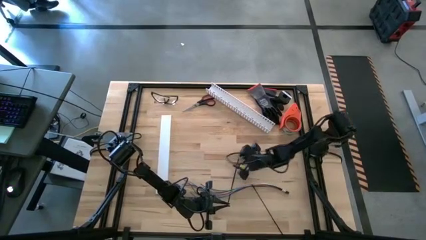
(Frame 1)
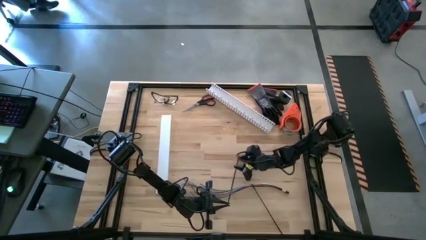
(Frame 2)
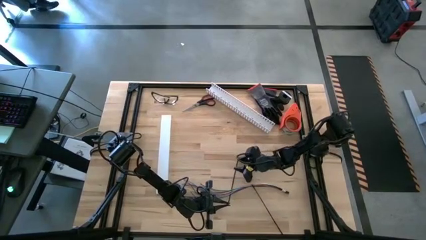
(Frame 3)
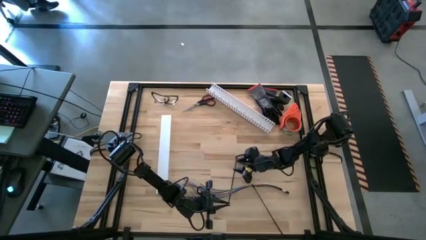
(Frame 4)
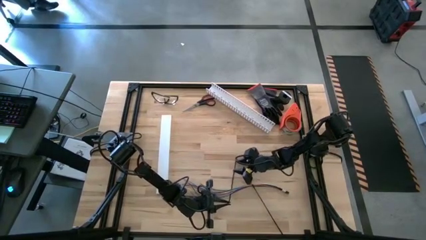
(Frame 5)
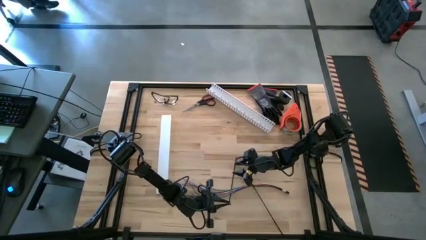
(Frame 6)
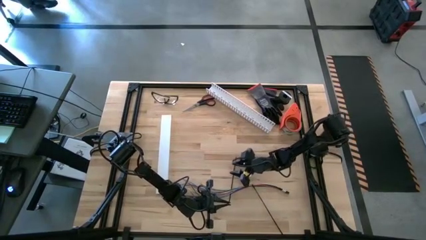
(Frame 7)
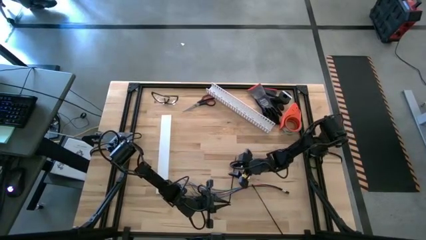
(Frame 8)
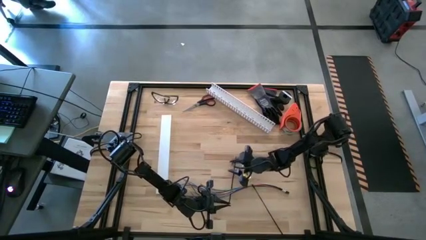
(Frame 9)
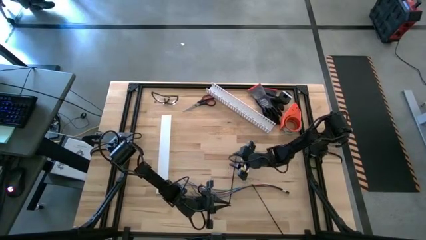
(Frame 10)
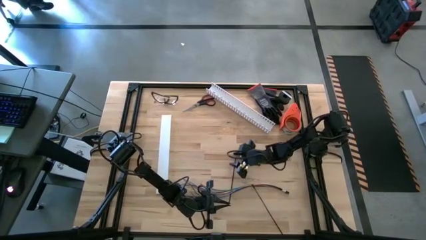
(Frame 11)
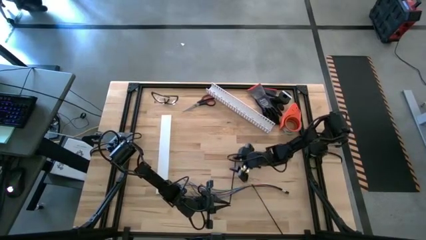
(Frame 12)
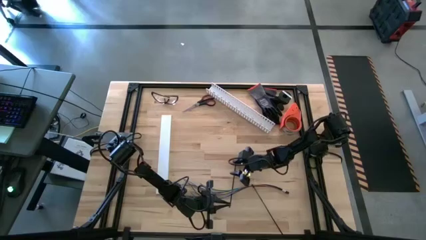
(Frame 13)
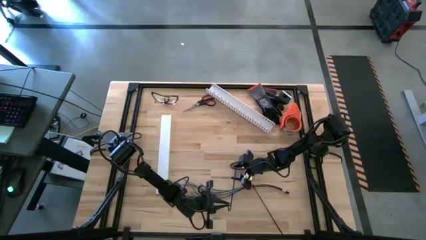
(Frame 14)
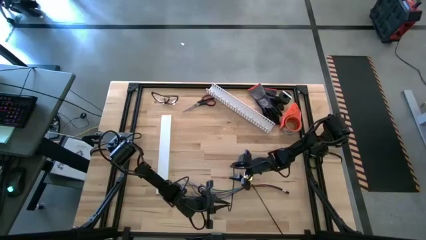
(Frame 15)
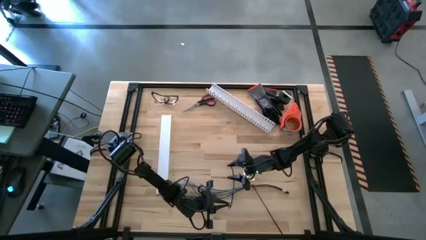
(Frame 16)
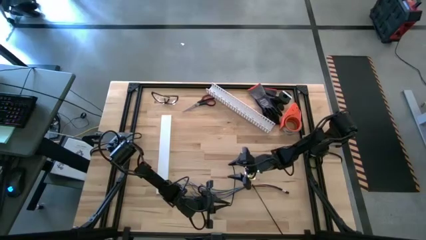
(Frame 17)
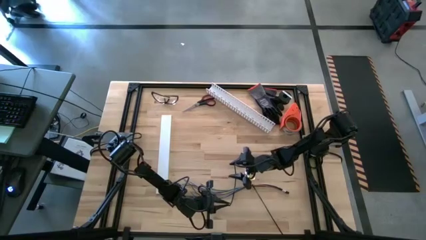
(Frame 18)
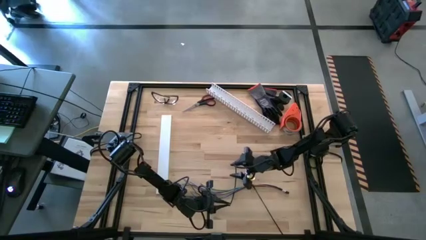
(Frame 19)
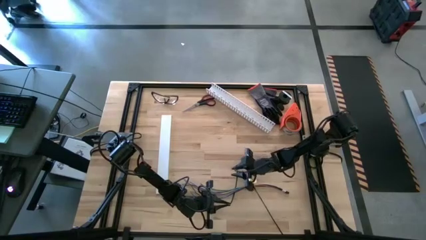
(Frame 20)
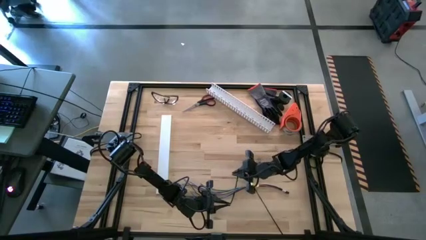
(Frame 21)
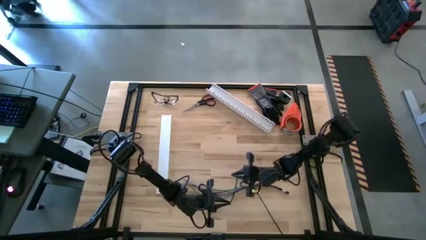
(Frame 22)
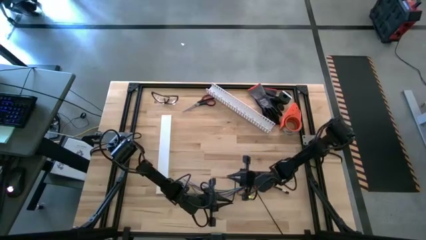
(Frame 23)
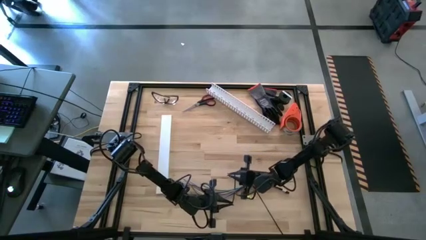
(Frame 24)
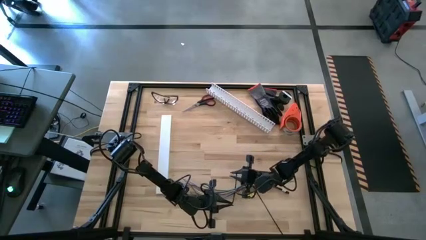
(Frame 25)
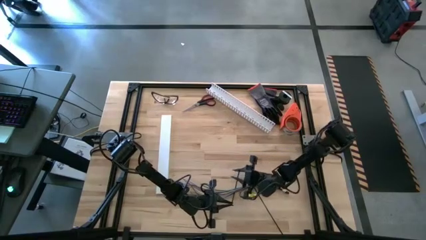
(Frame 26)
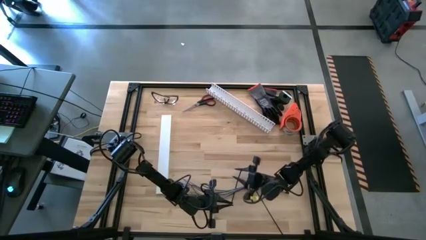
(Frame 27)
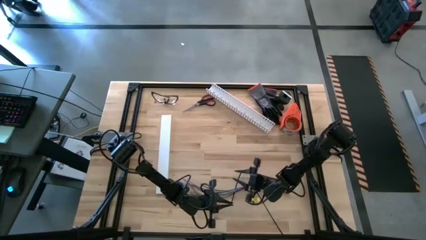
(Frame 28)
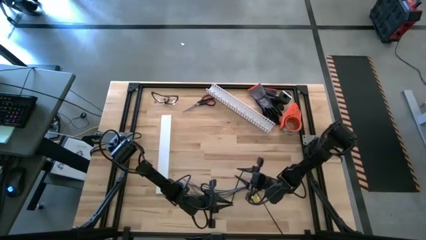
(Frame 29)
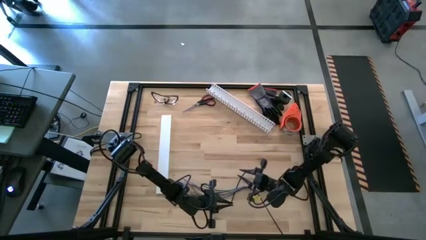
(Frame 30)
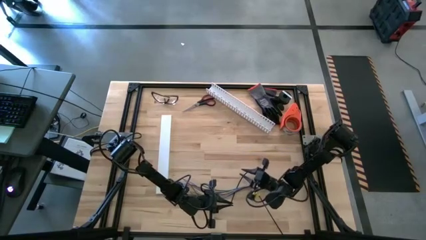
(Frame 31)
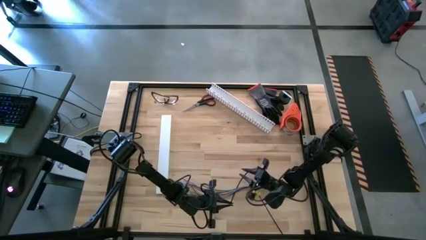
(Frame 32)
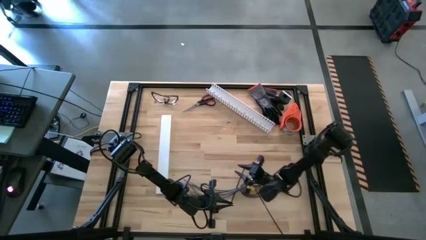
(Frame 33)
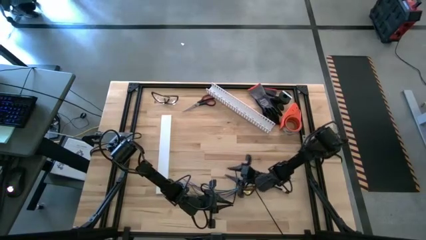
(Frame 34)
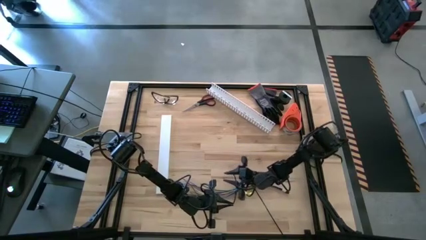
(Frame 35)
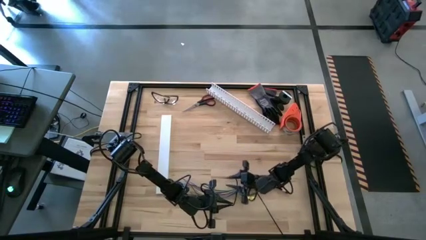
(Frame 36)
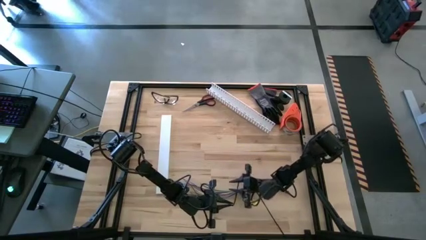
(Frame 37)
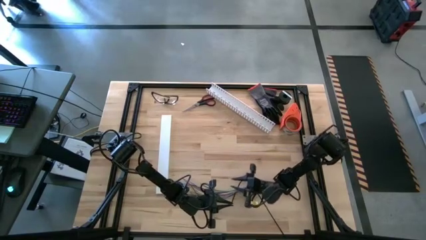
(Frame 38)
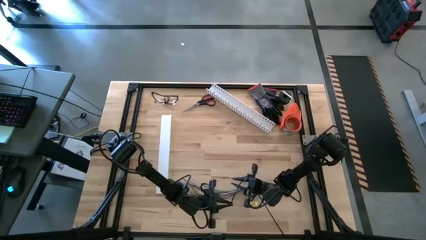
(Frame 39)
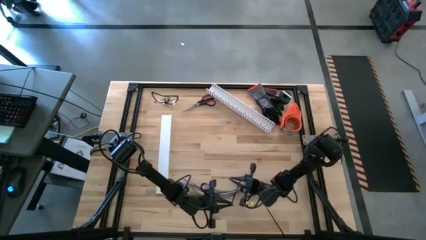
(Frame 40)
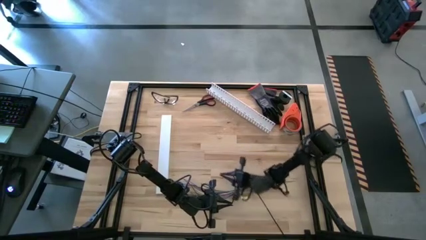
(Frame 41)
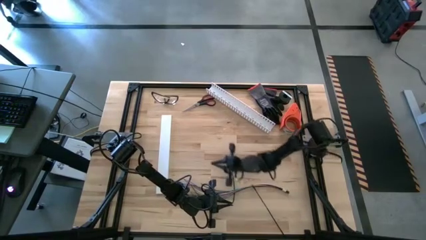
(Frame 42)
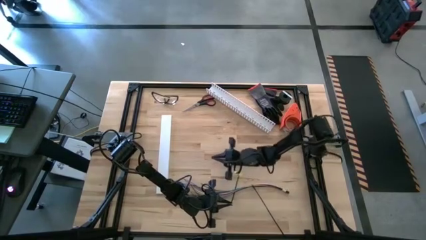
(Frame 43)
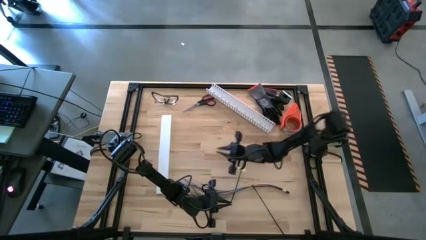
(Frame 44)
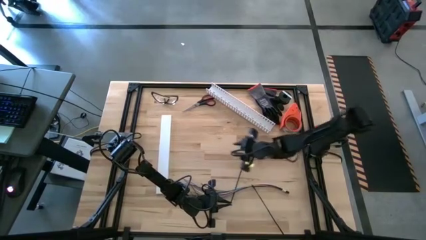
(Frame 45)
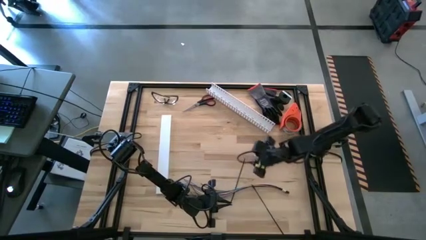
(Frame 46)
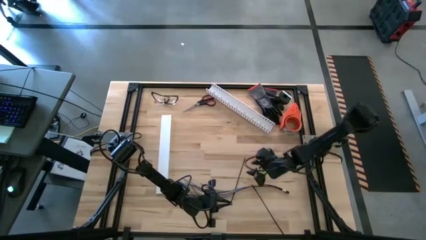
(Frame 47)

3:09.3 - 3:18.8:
Task: Ziptie cables
Wrap the black zip tie on the cable wires

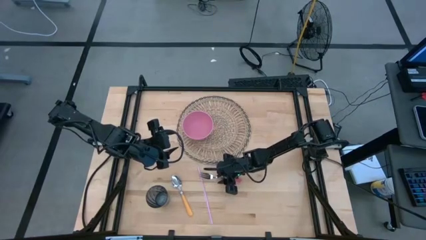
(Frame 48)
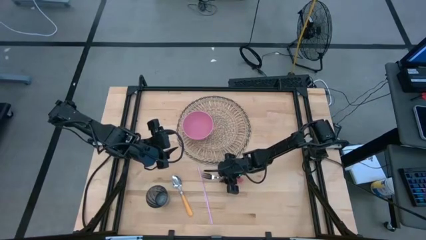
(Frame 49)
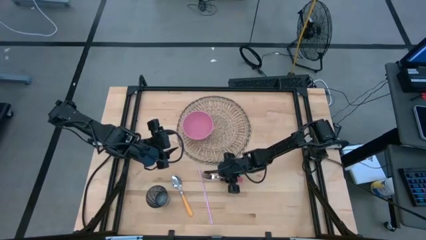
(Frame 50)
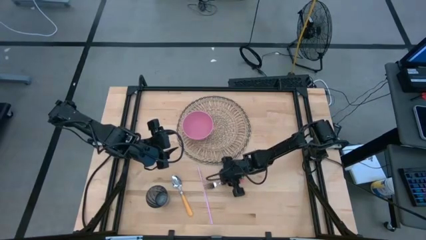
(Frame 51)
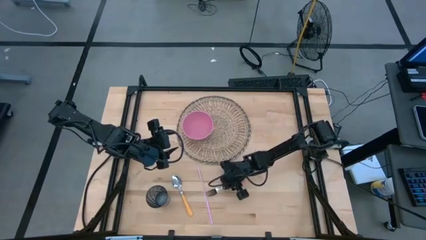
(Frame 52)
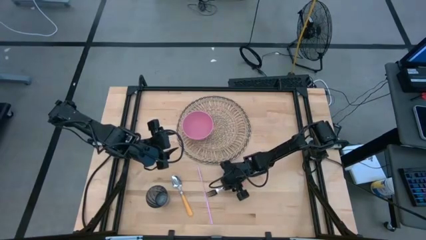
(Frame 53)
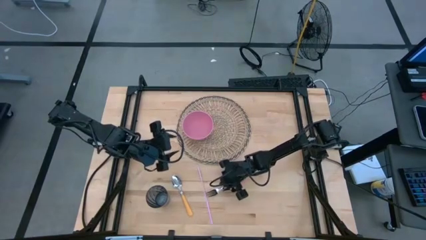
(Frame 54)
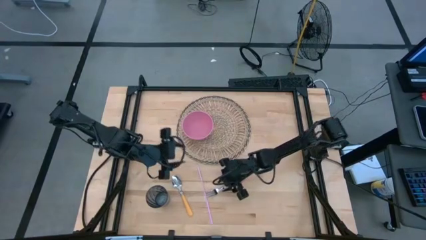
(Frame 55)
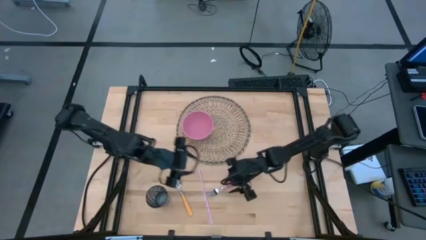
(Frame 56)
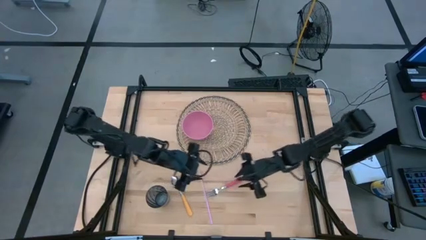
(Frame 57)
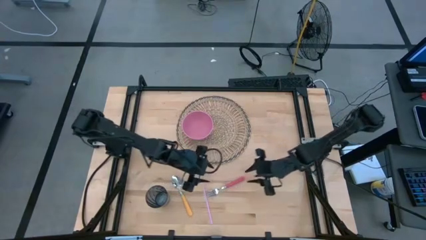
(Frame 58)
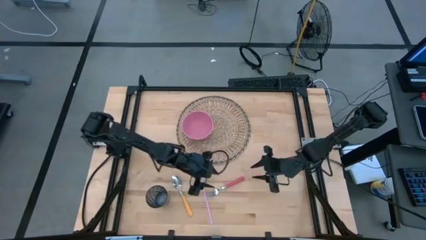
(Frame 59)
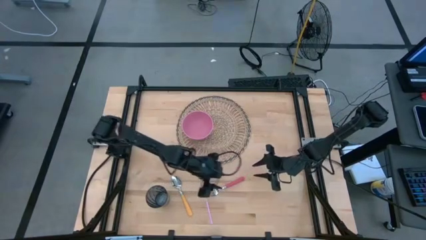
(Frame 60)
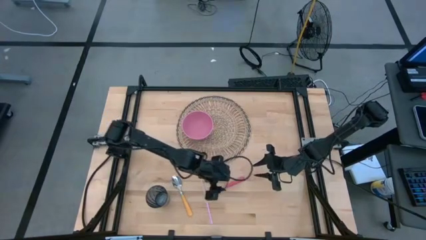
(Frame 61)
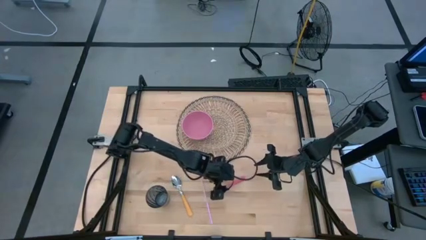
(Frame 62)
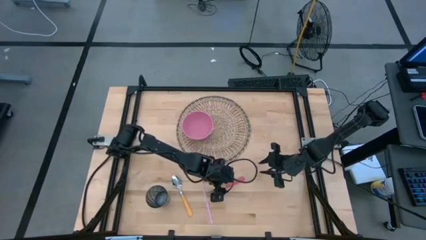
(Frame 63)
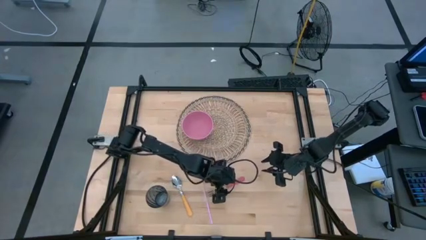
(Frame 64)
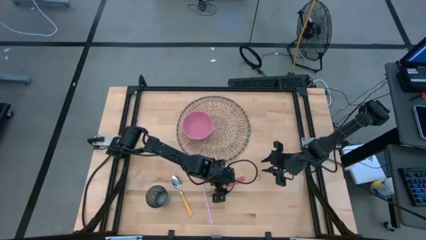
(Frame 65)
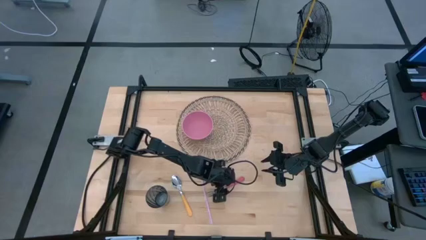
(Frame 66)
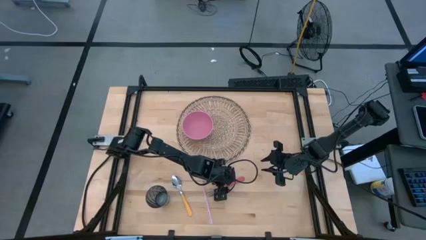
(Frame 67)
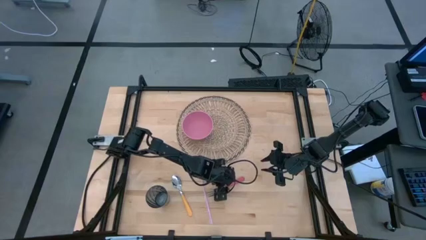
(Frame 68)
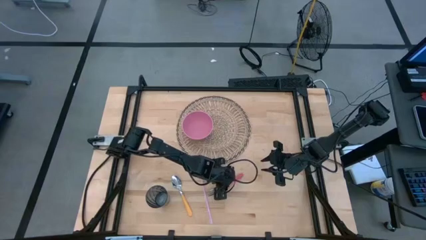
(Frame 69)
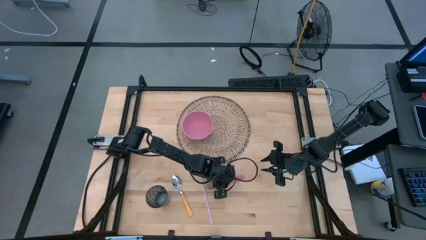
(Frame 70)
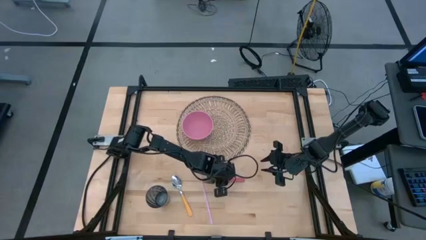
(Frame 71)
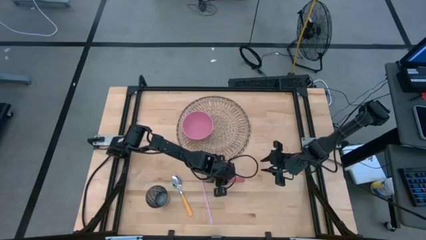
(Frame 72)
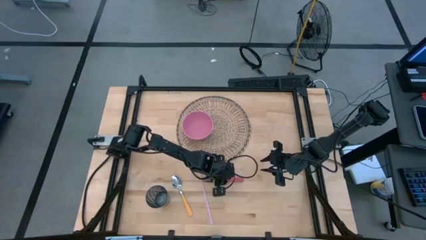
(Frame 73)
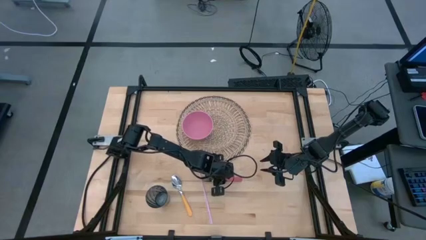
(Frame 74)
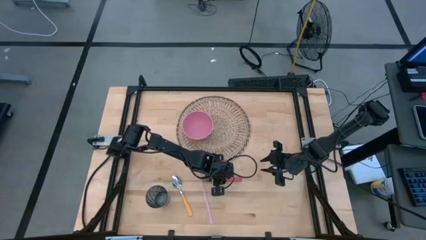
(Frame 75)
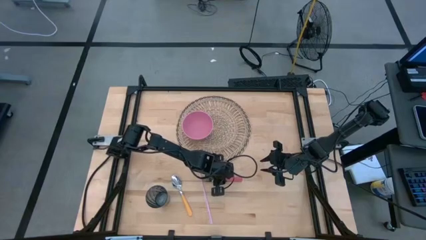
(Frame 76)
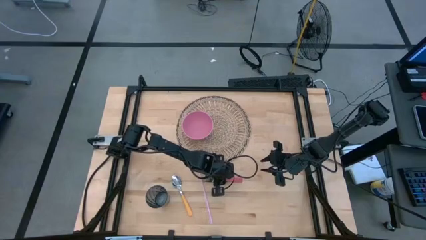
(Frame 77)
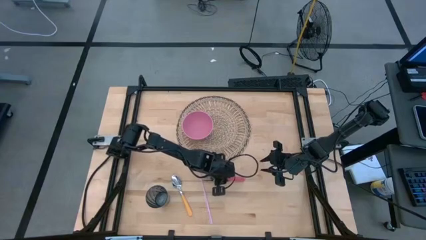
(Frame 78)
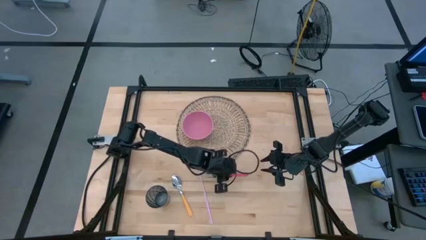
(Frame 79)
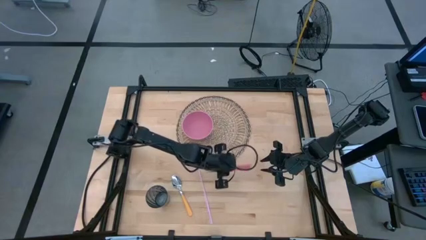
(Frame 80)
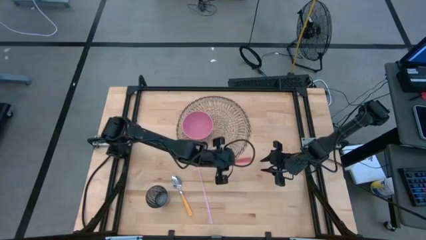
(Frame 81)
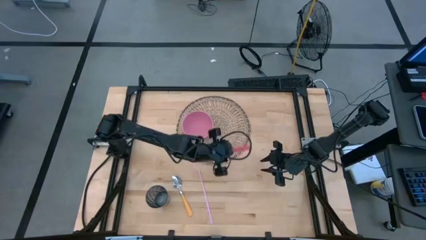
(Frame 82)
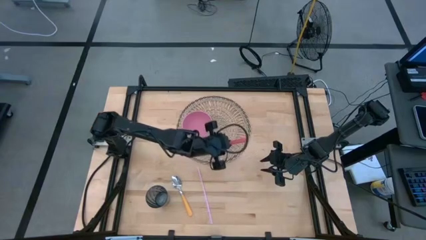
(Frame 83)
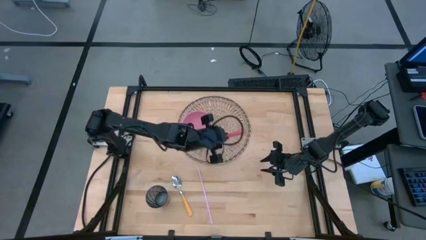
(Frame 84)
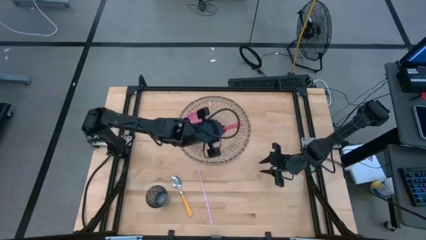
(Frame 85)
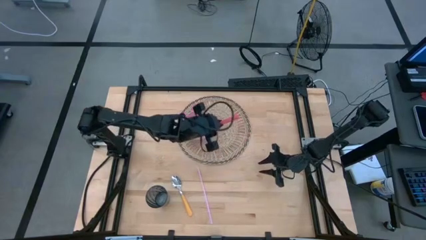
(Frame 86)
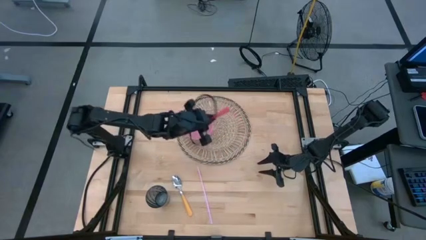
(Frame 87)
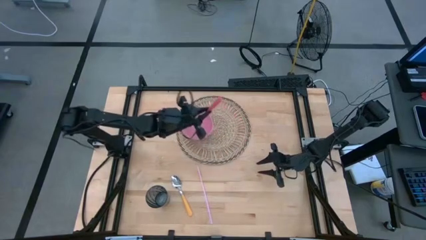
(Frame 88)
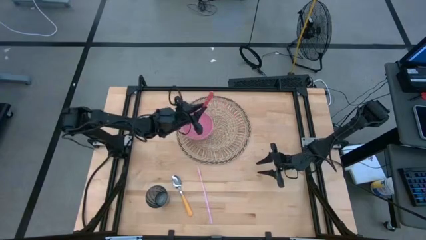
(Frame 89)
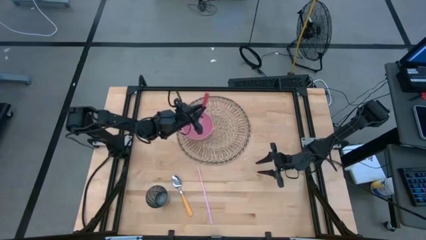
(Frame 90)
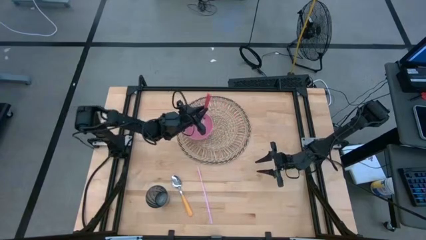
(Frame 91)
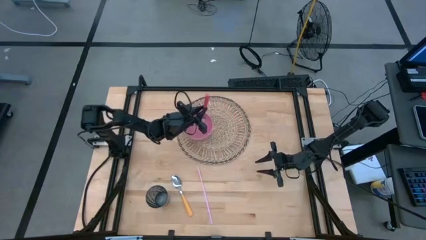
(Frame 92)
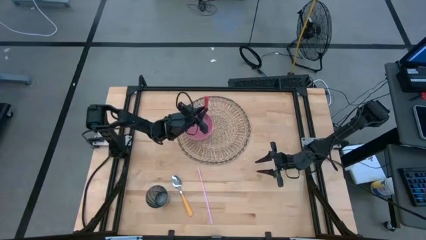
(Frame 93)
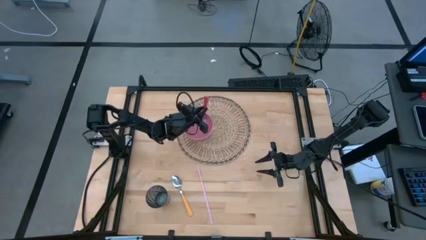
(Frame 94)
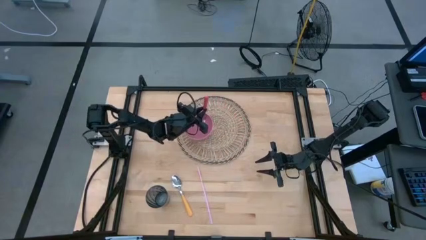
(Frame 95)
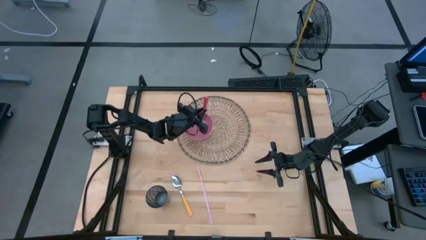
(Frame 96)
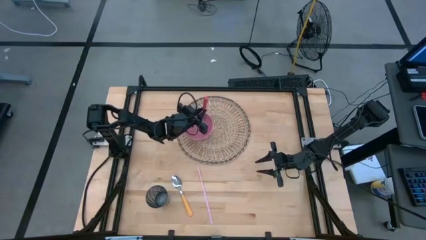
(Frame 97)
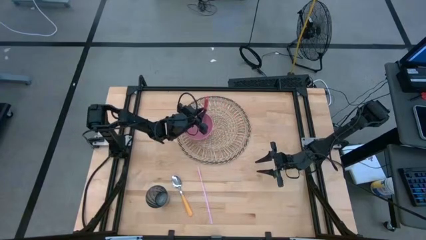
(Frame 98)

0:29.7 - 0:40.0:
Task: Pick & Place Utensil
Put the pink fork on the pink bowl on the brown placemat
